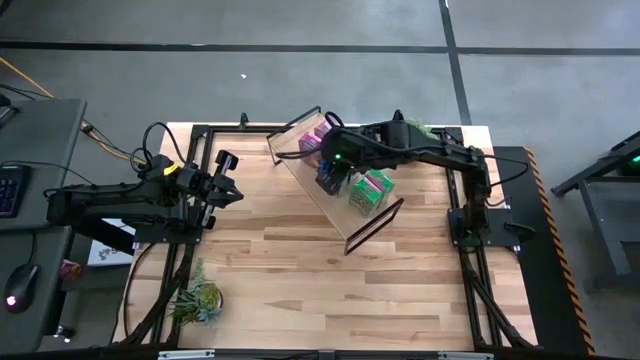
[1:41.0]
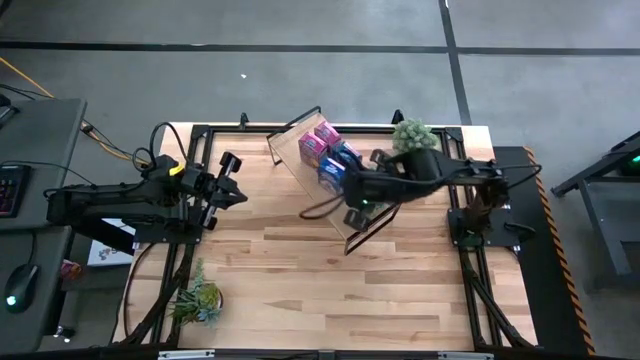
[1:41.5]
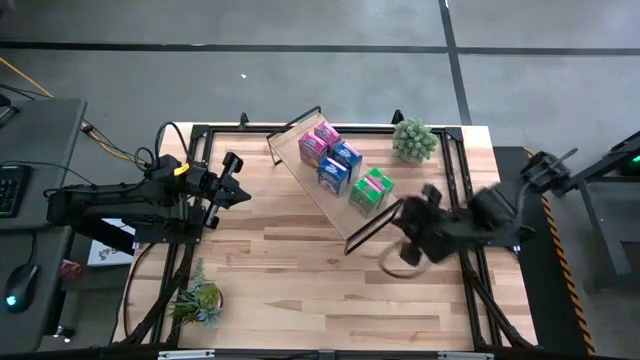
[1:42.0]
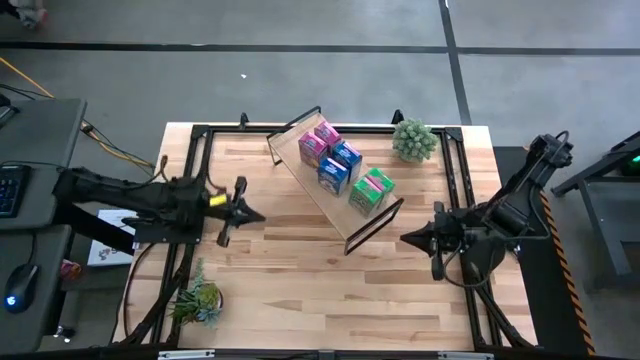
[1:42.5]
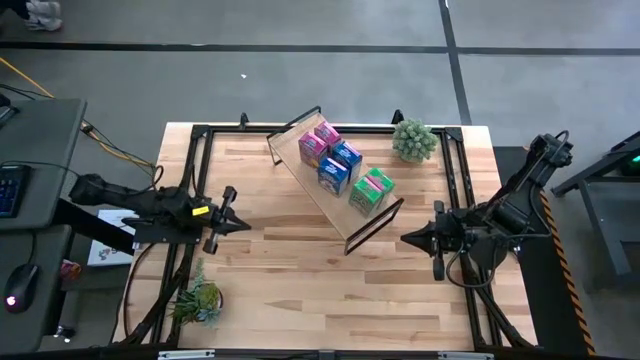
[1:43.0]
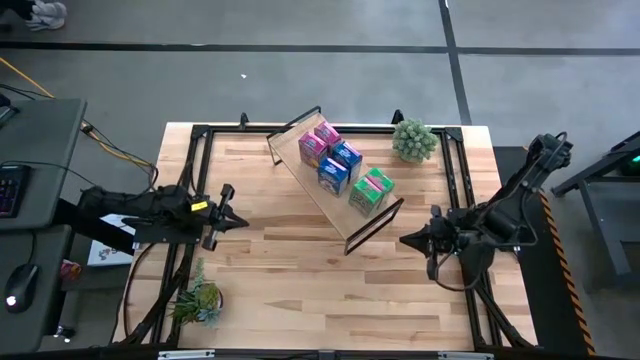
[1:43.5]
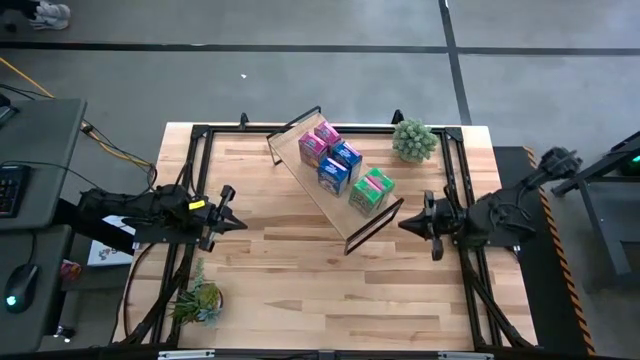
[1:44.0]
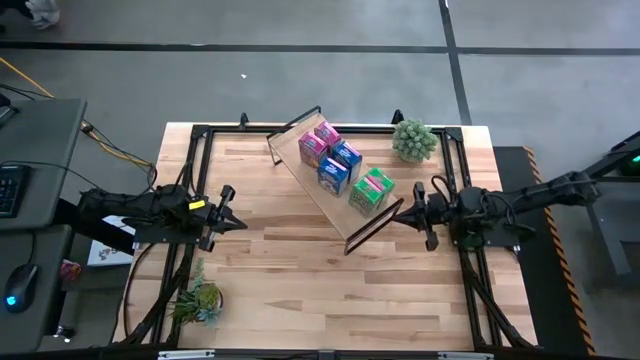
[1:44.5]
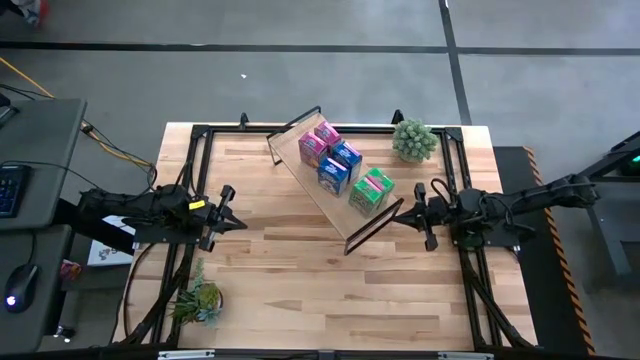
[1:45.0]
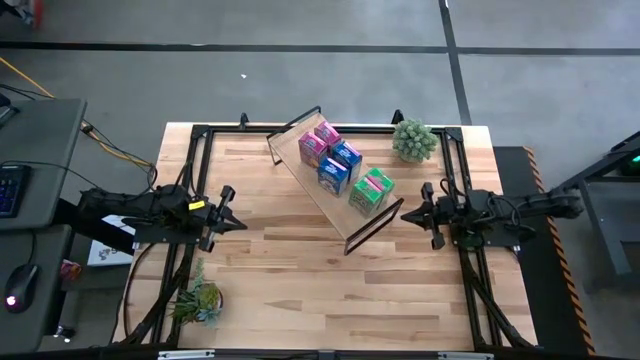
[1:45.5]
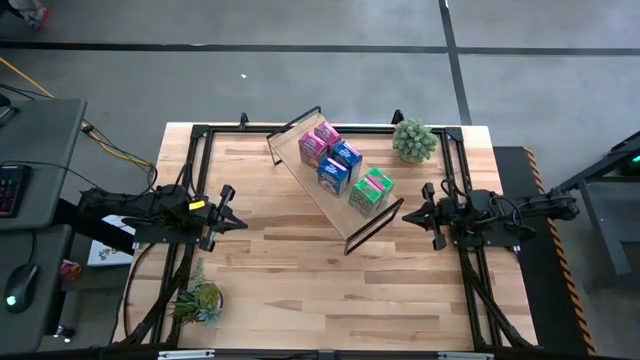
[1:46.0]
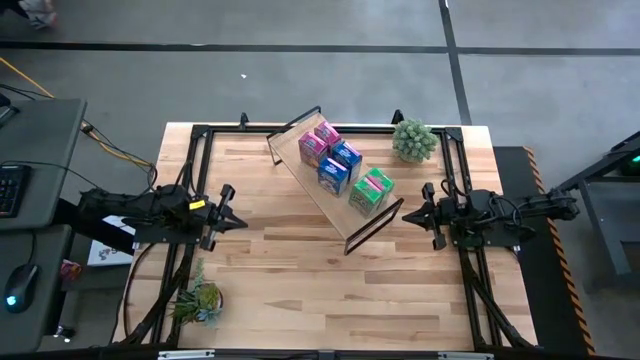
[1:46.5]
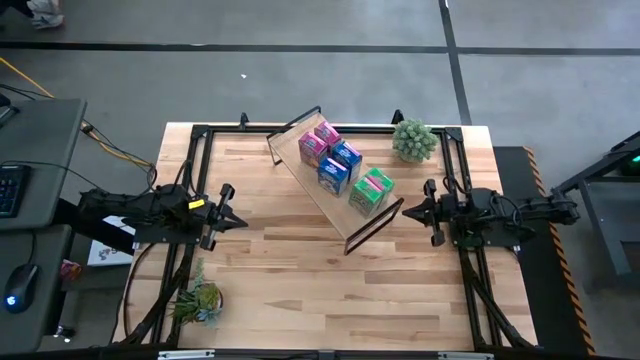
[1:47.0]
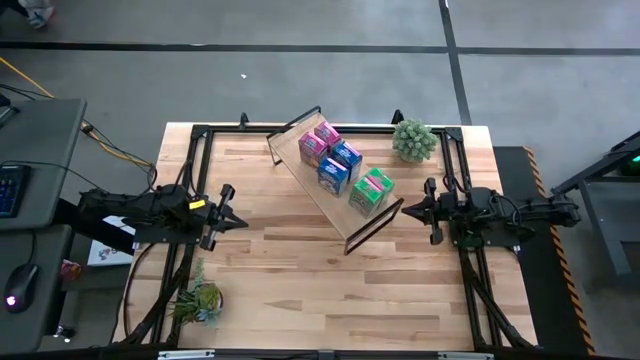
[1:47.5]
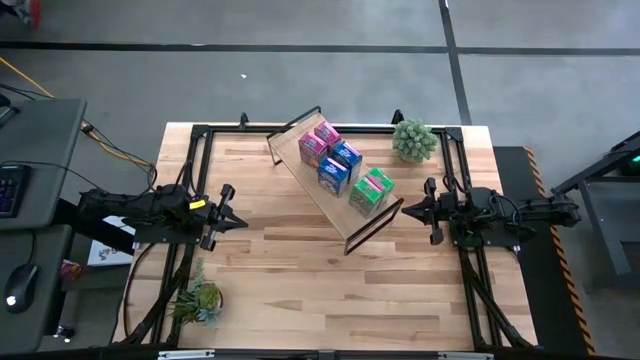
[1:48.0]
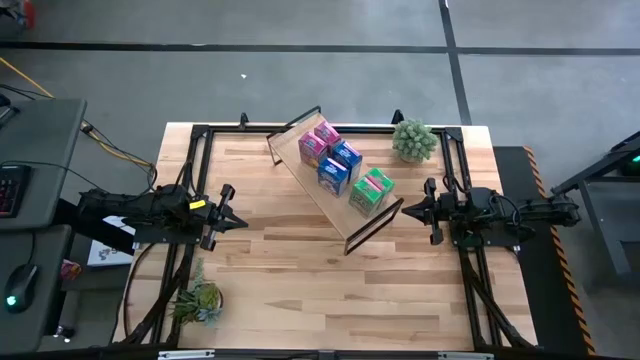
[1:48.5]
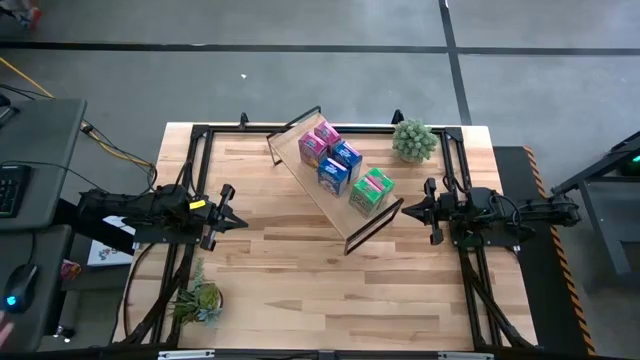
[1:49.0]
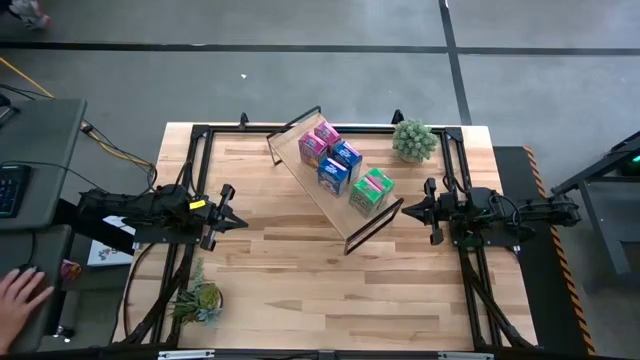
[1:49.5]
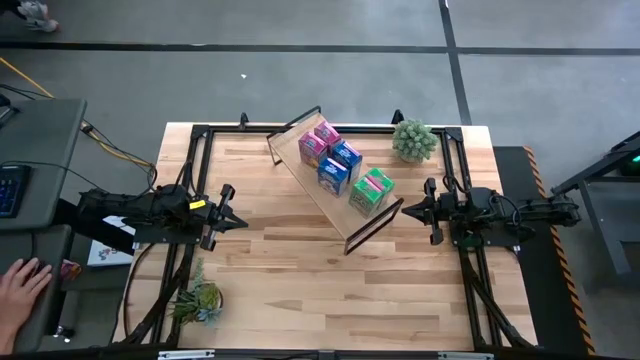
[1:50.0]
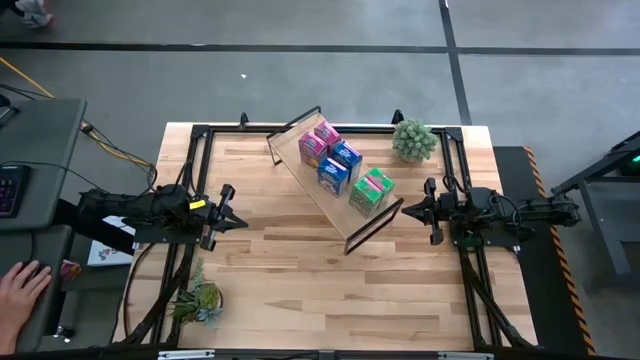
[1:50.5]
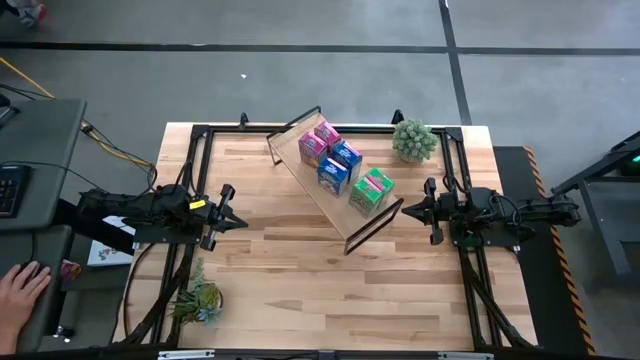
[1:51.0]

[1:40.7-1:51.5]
Task: Stack cereal on shelf
Return to Home Position

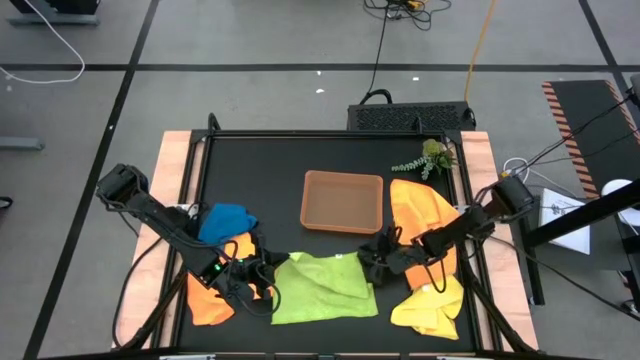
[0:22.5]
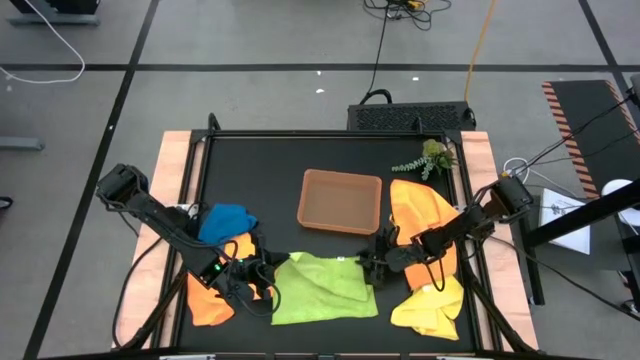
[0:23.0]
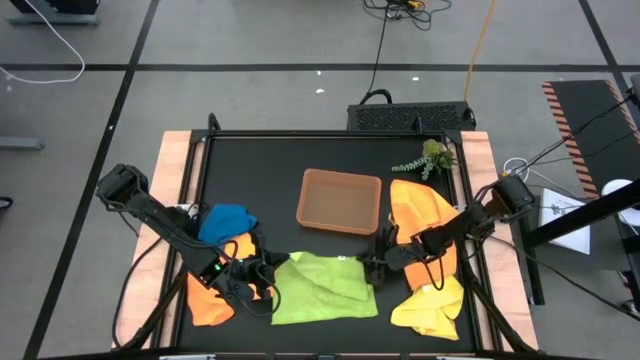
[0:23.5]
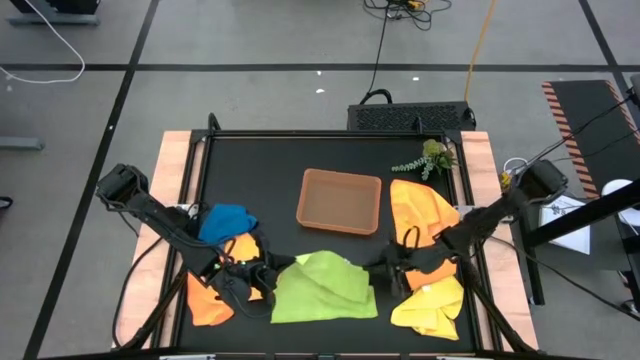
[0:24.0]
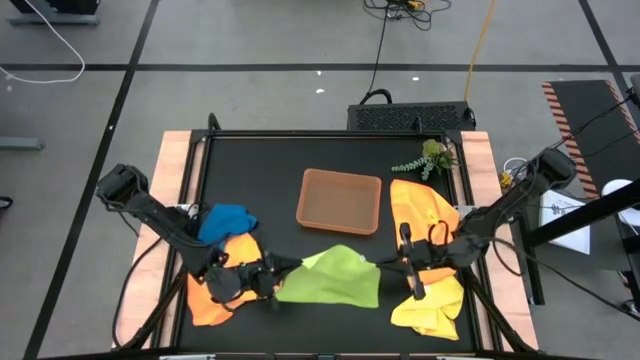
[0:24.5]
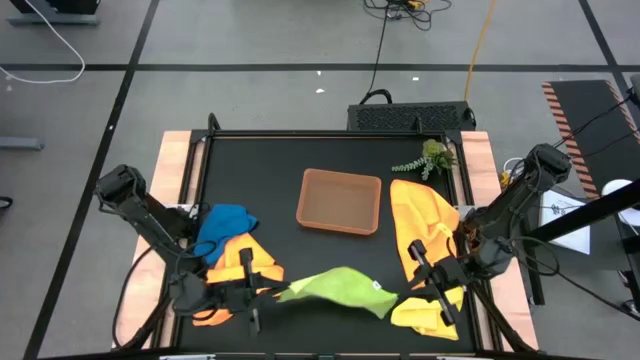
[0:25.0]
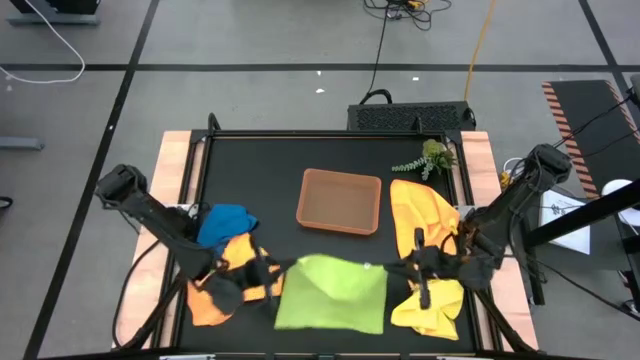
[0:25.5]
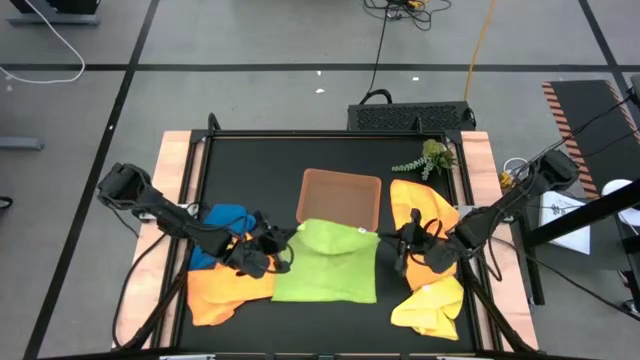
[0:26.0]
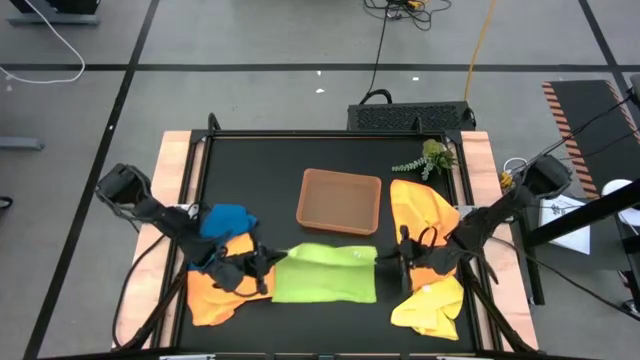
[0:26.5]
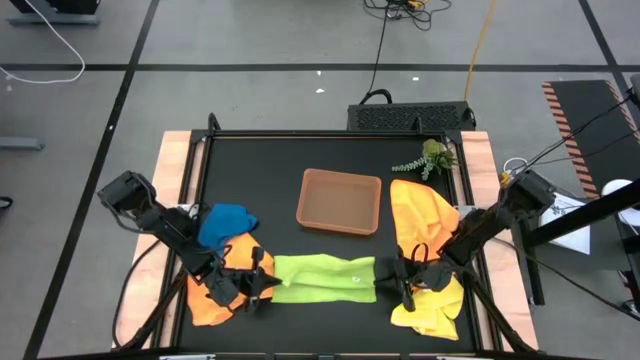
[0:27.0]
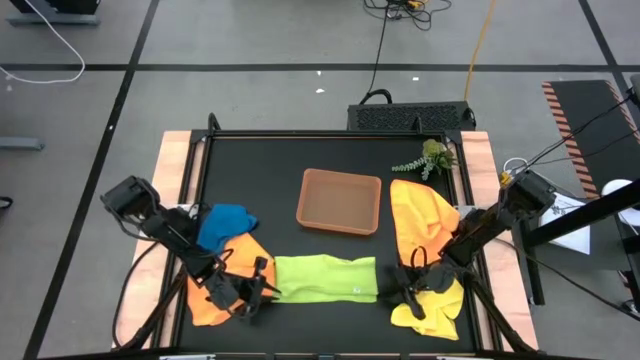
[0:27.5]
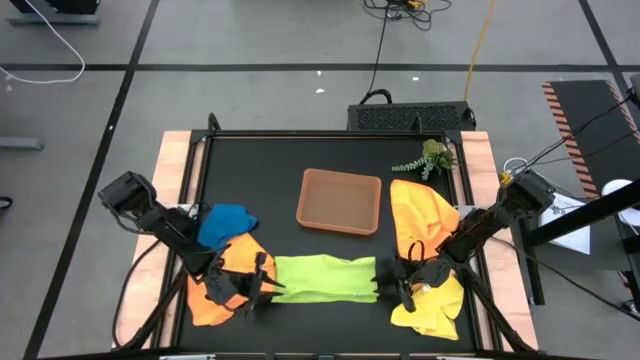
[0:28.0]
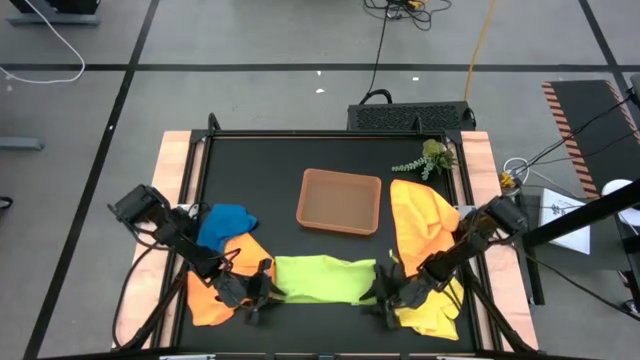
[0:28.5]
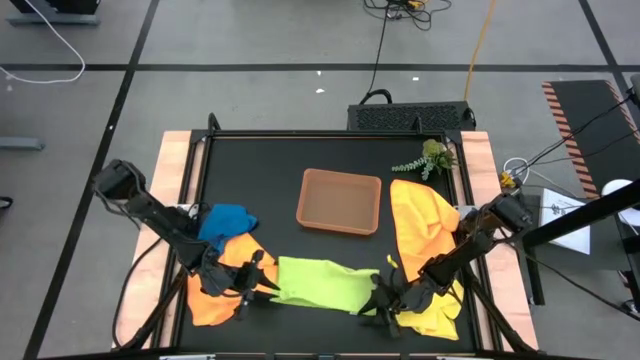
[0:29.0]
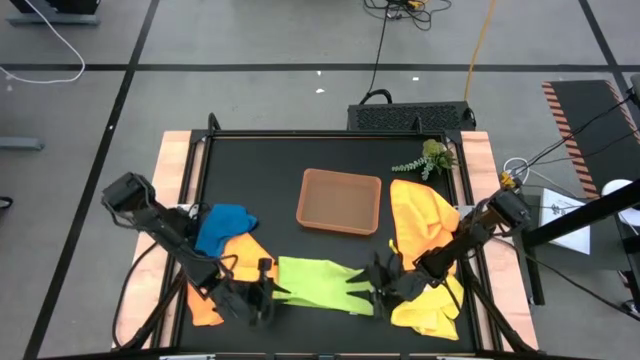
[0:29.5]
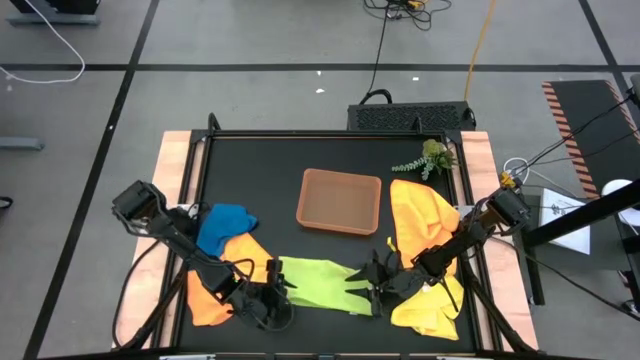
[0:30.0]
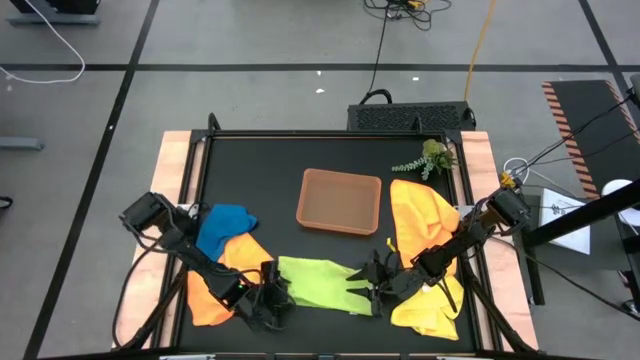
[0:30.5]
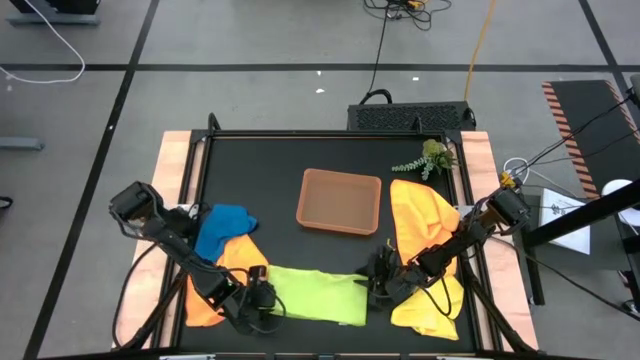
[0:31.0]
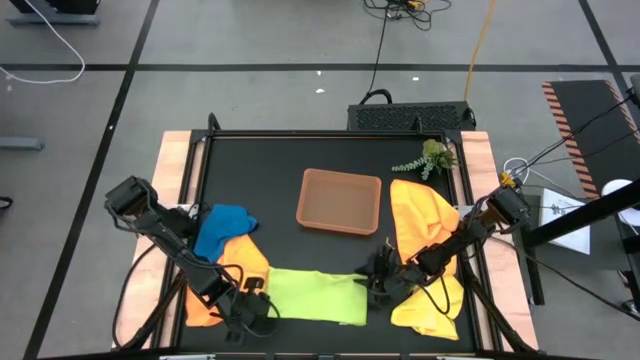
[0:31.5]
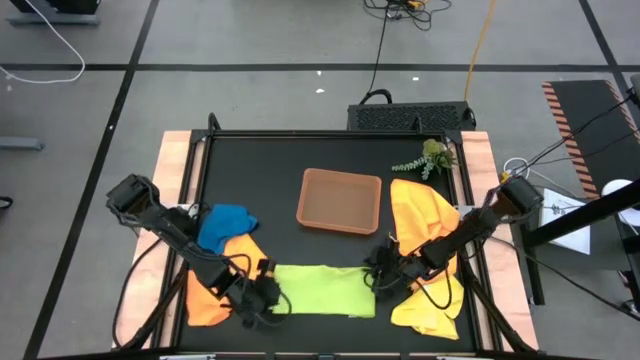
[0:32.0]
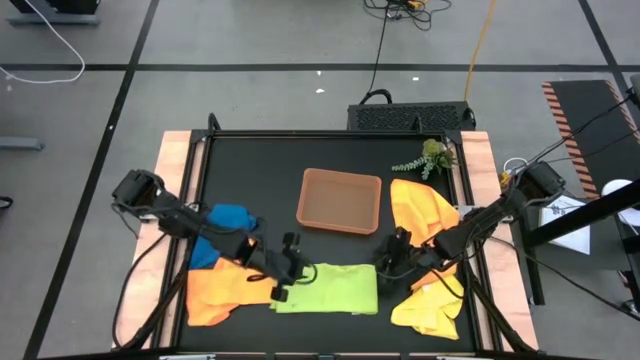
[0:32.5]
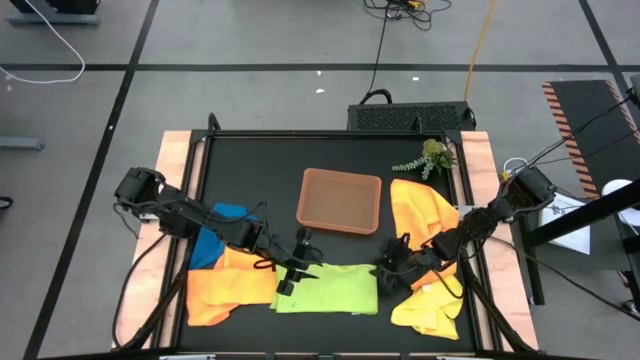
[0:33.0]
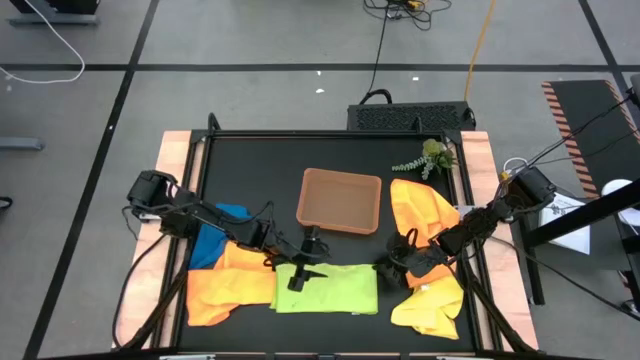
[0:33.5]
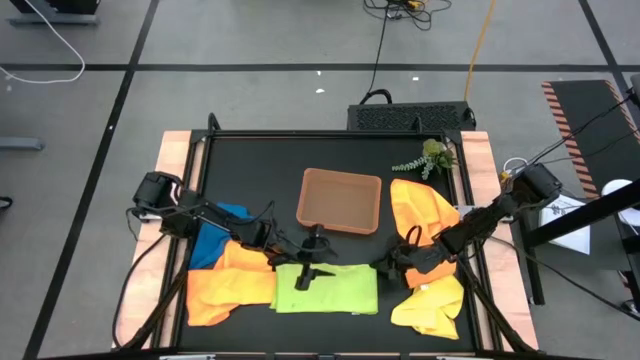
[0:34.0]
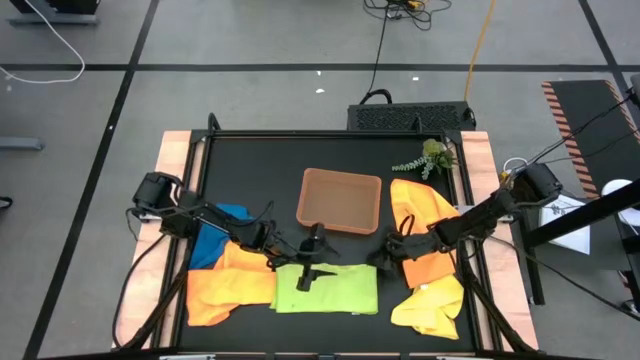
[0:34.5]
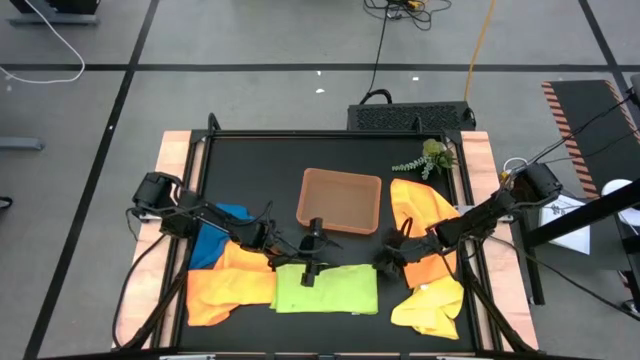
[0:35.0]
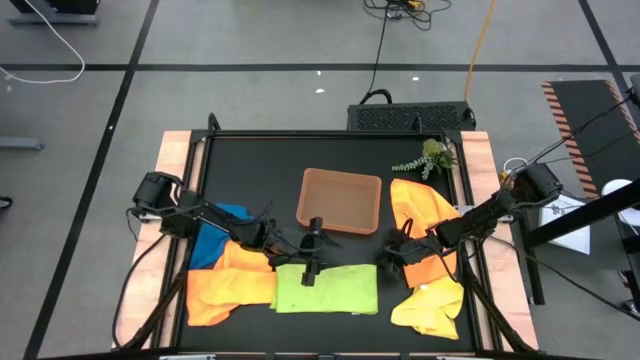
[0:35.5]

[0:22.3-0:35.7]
Task: Fold microfiber towels
Fold the green microfiber towel
